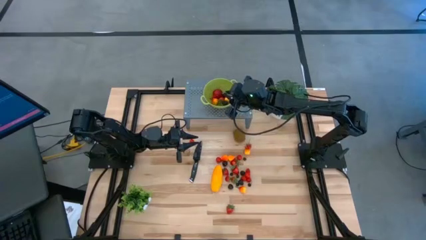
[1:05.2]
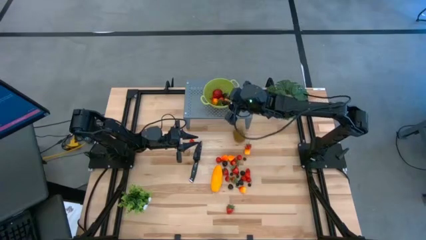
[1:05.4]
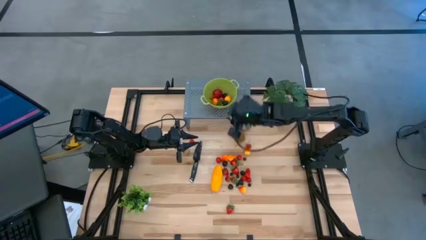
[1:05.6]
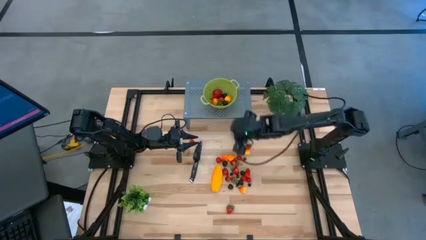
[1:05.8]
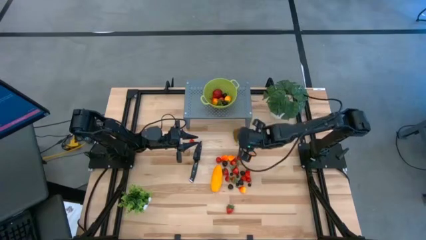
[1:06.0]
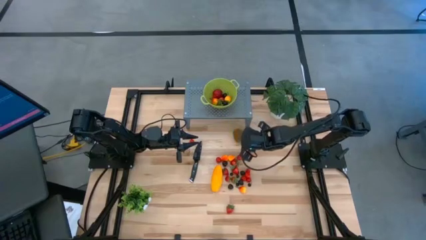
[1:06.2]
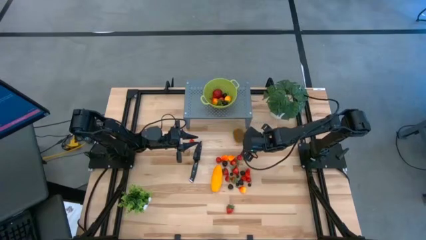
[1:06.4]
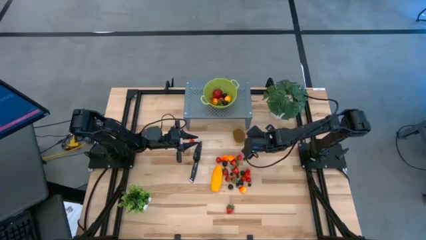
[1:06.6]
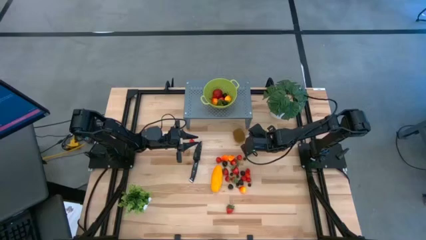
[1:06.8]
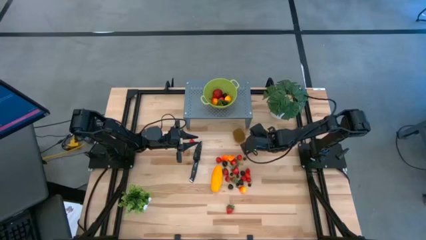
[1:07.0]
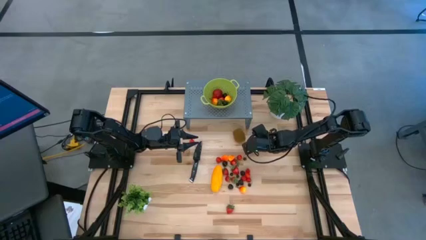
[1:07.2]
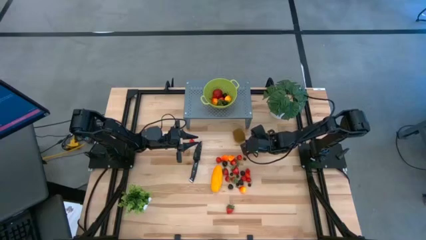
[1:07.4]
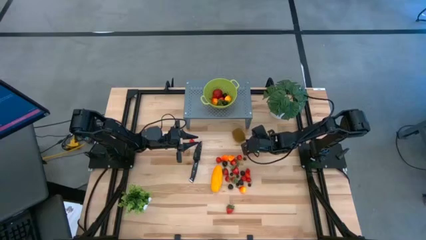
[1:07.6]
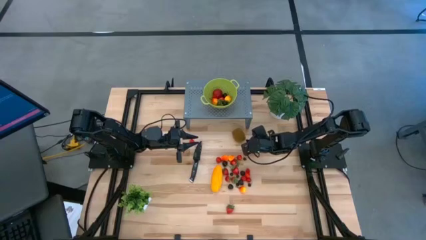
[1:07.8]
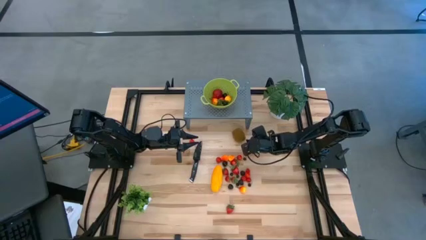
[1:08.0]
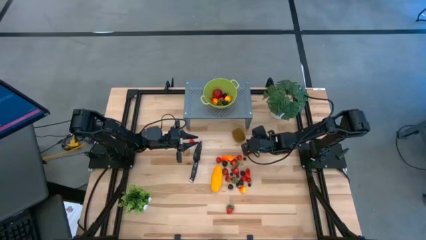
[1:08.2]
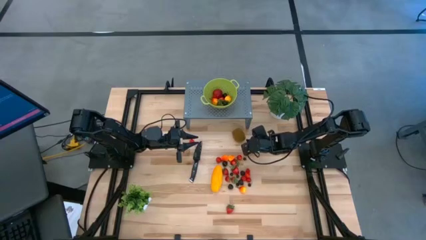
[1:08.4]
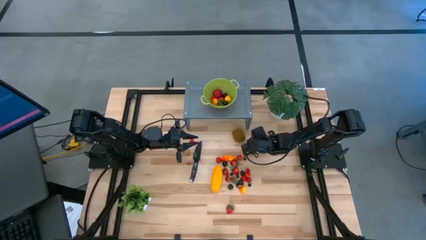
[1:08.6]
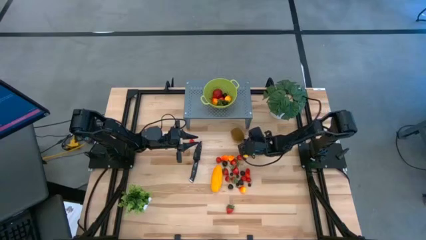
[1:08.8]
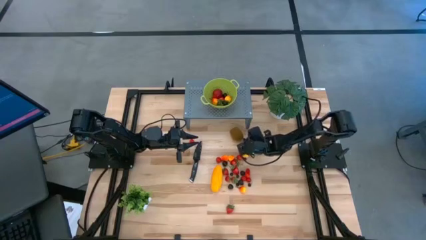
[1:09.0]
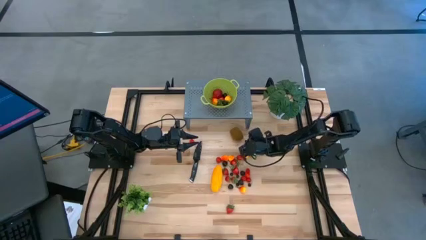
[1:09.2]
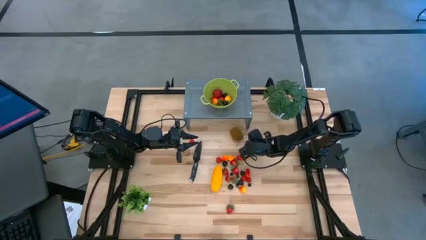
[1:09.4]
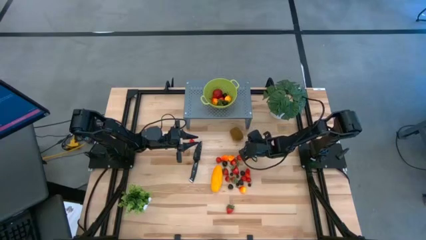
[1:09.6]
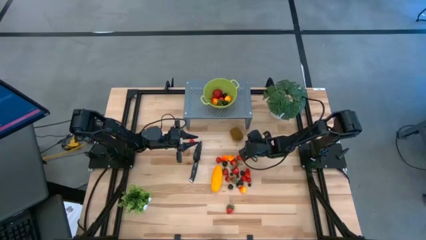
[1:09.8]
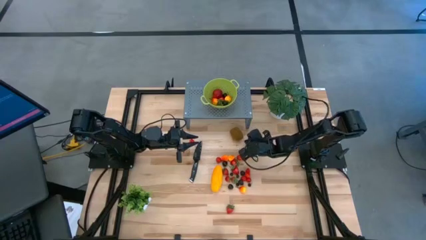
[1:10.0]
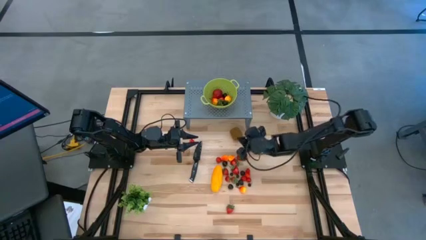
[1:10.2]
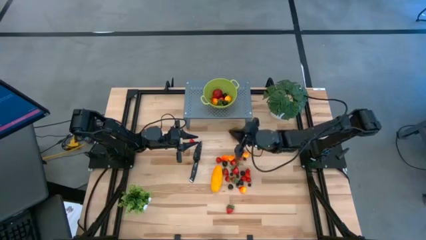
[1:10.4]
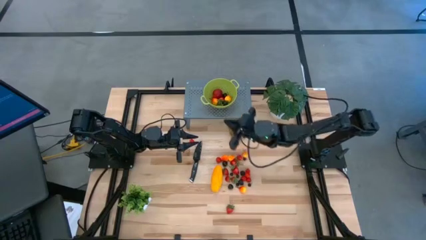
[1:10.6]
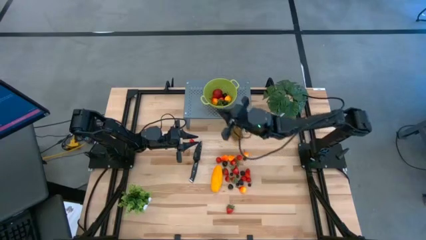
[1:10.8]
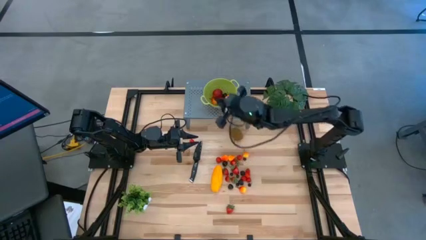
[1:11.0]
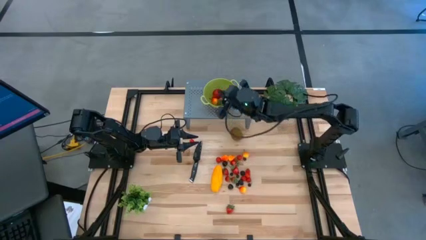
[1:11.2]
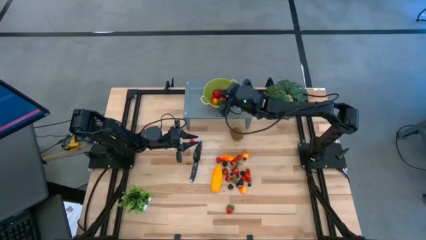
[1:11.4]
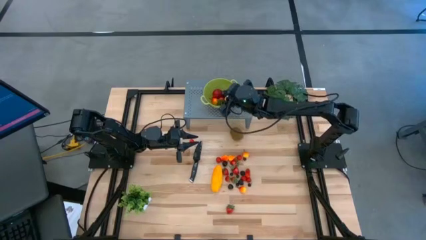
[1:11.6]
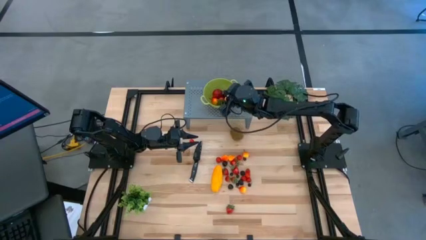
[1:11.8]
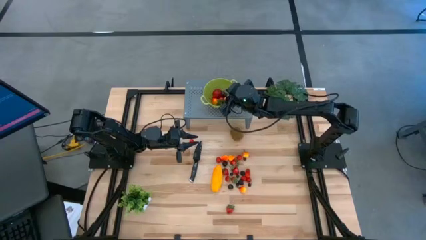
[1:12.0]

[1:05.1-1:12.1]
Task: Pick & Place Fruit
Put the strawberry into the green strainer bowl on the shelf

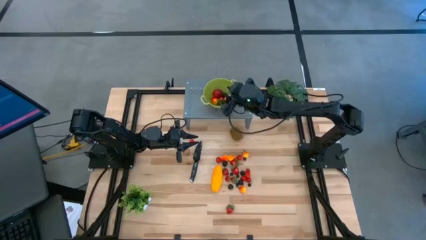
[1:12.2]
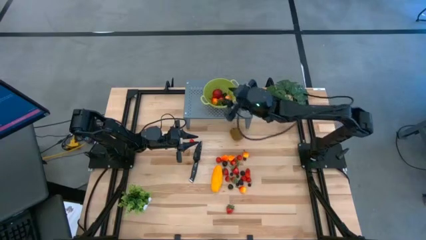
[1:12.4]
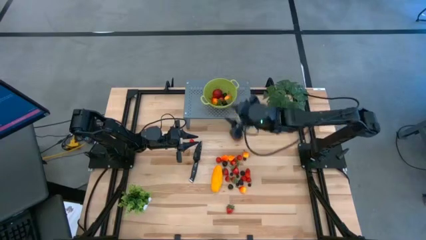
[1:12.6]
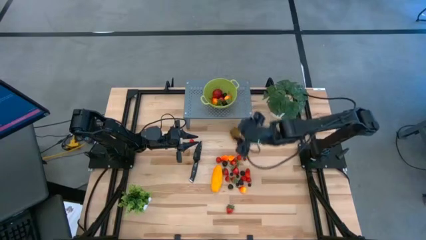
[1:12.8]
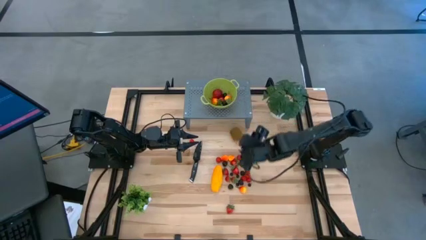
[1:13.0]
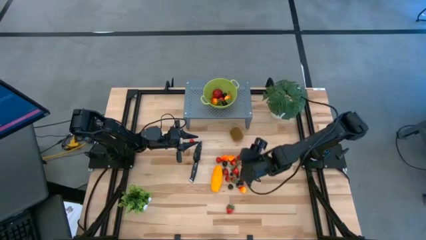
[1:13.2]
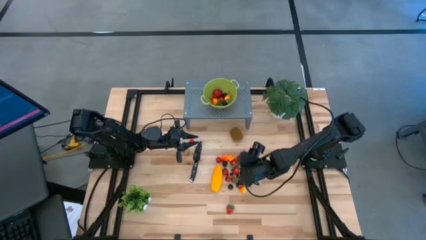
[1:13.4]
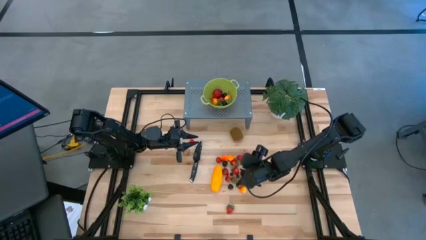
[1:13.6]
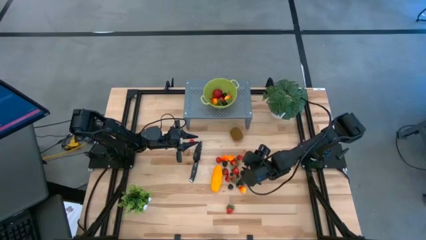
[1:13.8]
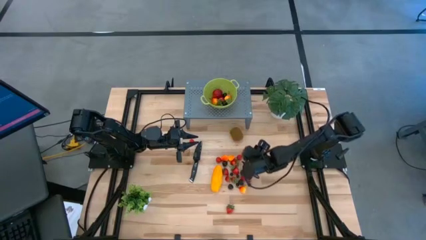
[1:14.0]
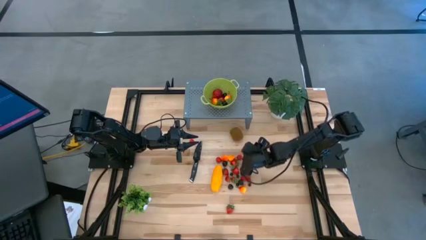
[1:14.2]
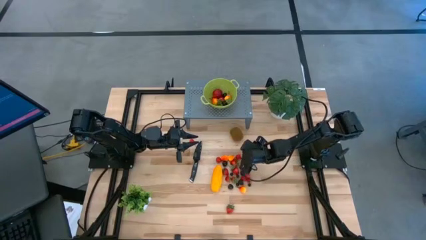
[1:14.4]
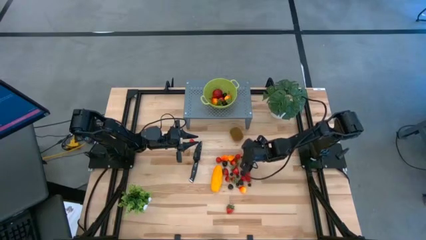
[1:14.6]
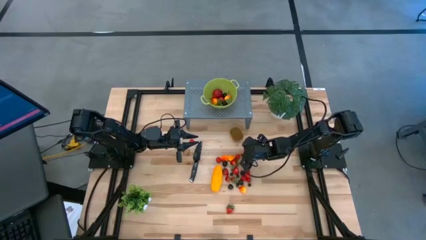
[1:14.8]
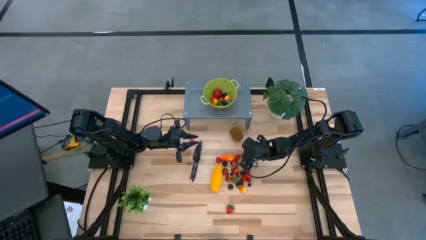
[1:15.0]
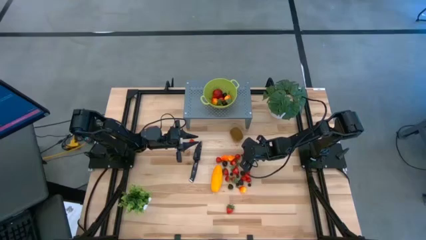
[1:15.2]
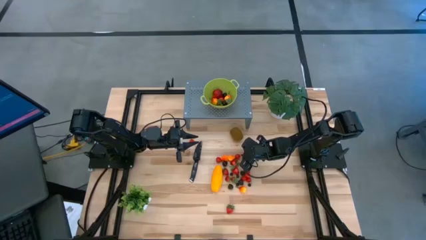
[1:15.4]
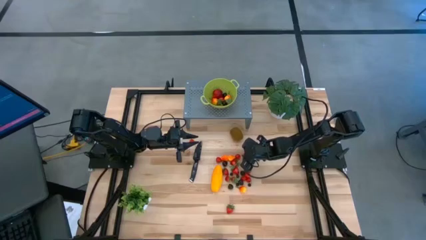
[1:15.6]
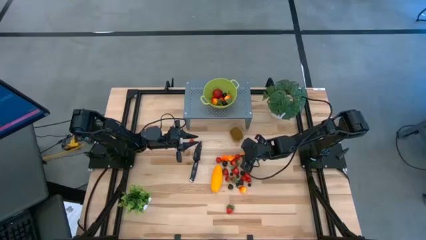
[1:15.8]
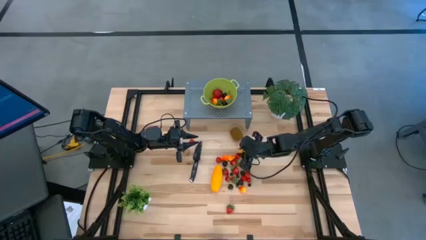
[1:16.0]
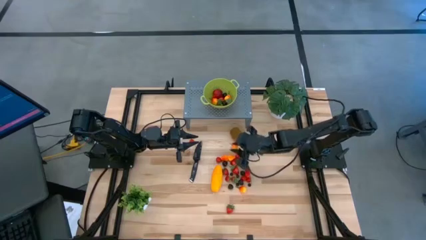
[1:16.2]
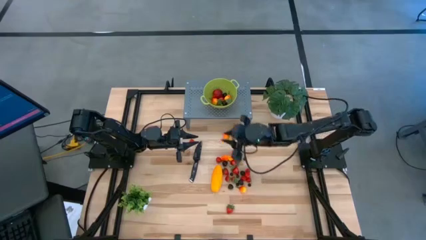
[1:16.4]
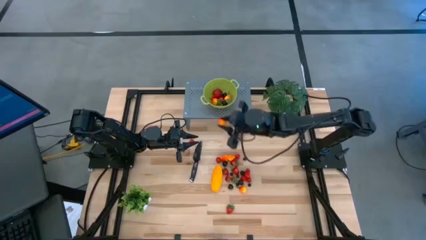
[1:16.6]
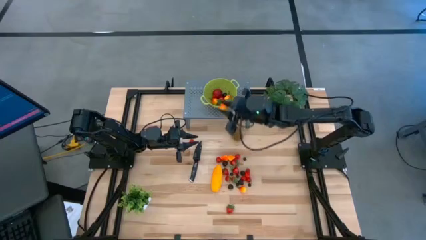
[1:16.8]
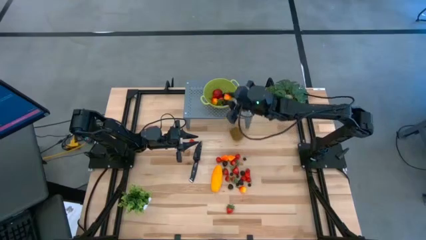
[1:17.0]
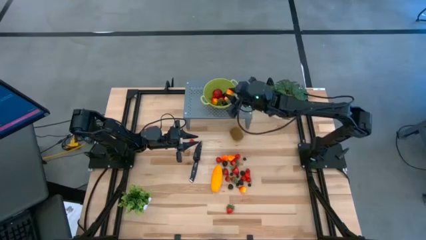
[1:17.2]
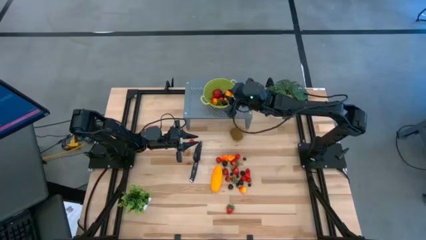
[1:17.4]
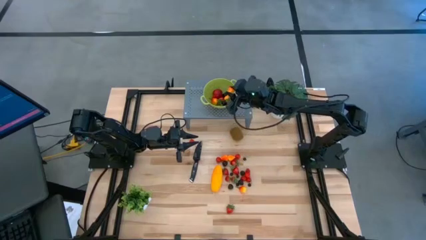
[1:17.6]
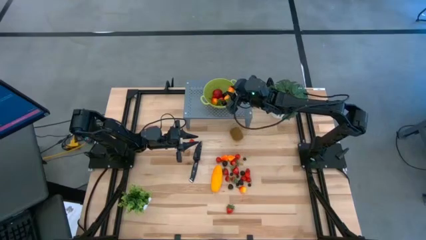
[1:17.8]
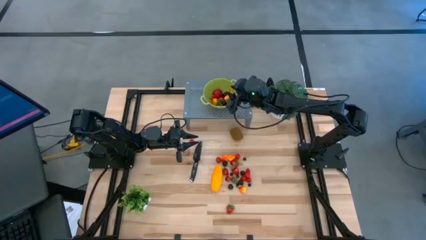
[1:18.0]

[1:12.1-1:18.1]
Put the peach into the green strainer bowl on the shelf

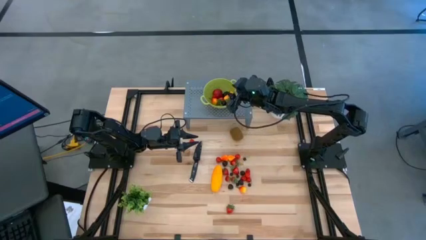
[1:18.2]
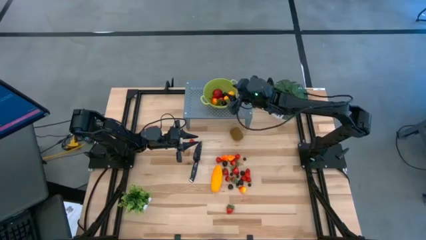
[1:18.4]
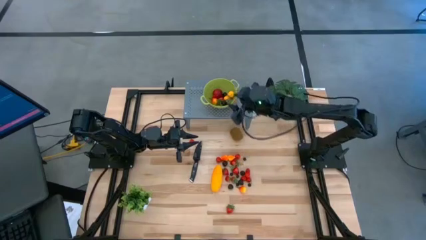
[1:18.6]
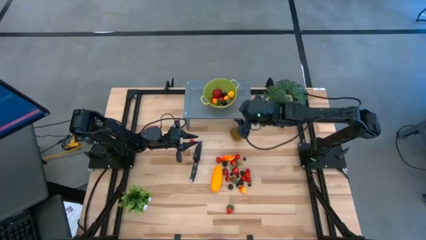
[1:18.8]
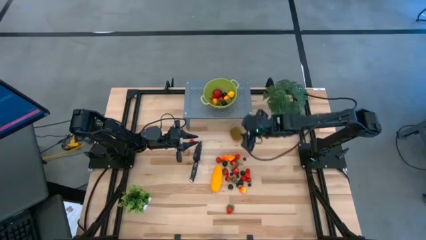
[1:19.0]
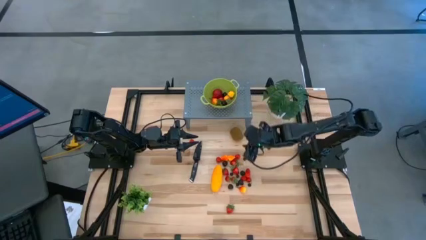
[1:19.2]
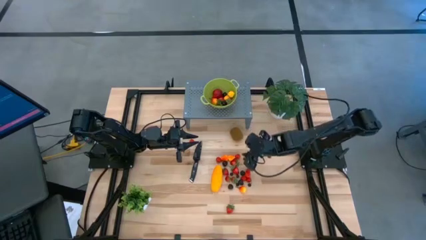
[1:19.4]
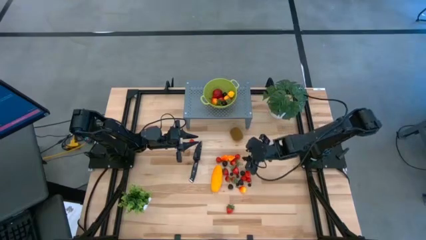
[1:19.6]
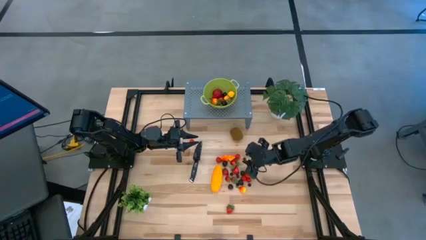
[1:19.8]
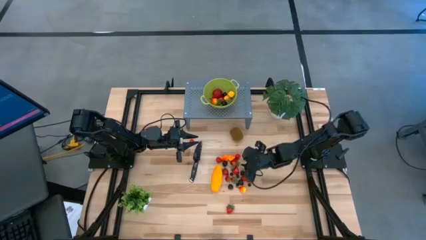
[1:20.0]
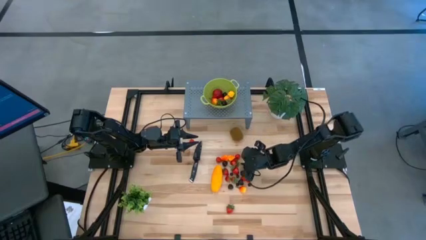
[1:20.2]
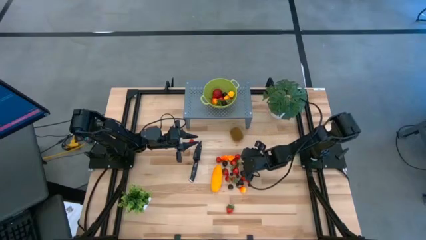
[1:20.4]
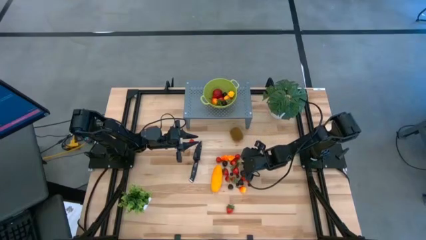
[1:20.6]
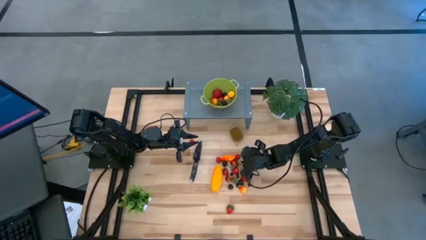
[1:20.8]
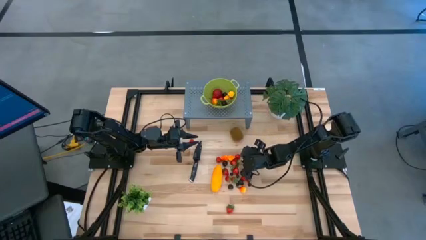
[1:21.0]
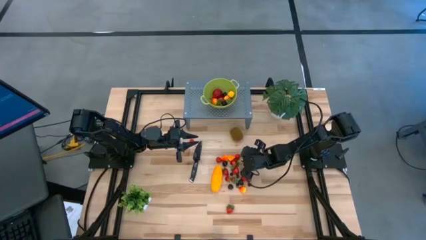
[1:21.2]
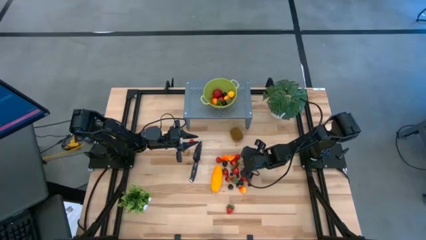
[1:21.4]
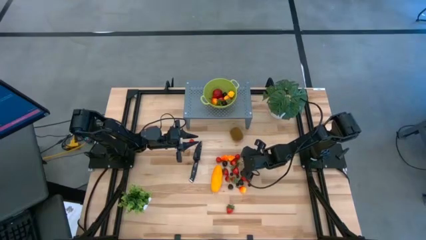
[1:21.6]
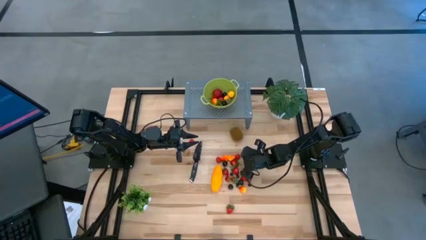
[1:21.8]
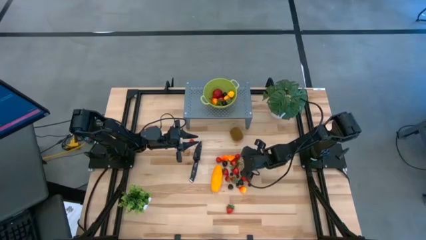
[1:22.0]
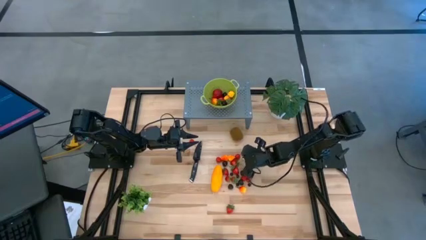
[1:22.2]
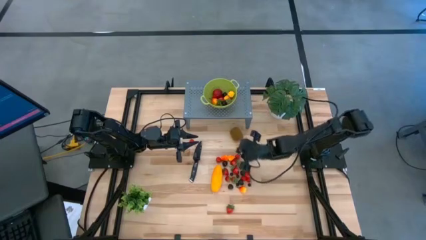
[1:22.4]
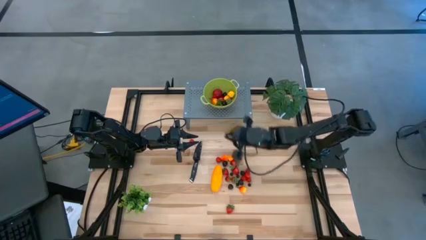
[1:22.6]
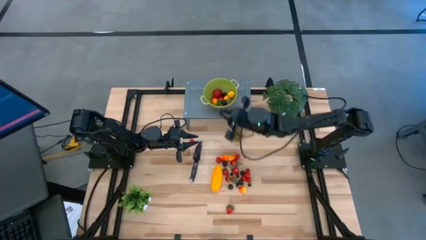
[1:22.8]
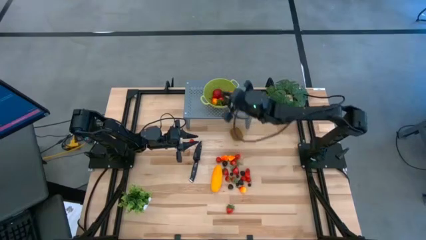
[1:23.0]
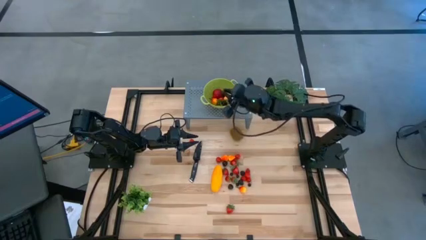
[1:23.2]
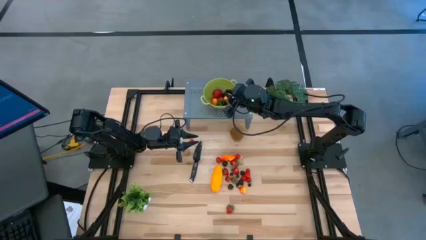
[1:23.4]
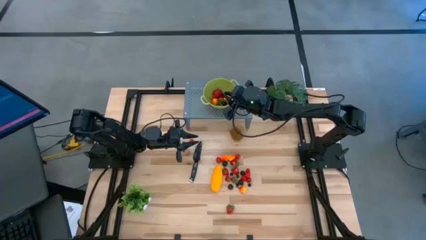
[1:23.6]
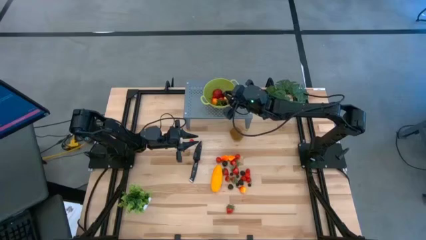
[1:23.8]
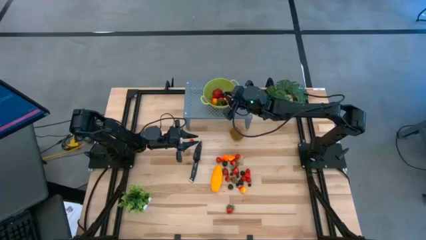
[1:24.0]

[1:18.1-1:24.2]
Put the blueberry into the green strainer bowl on the shelf
